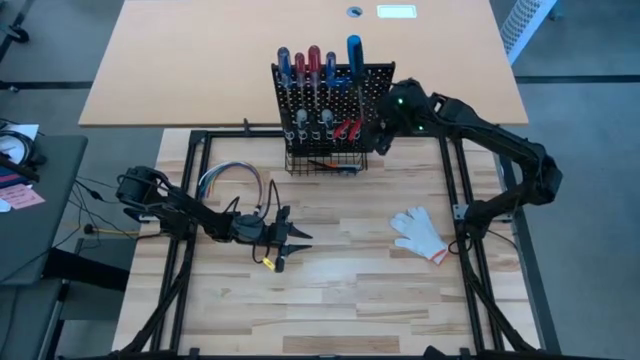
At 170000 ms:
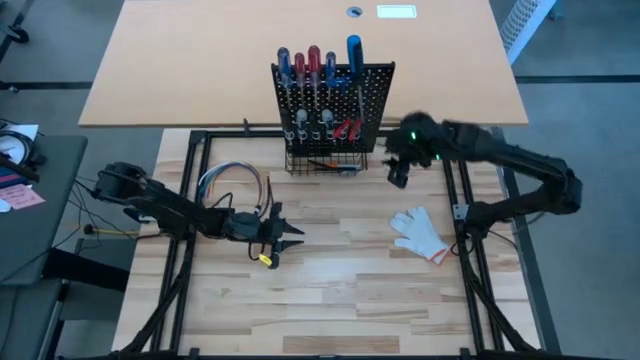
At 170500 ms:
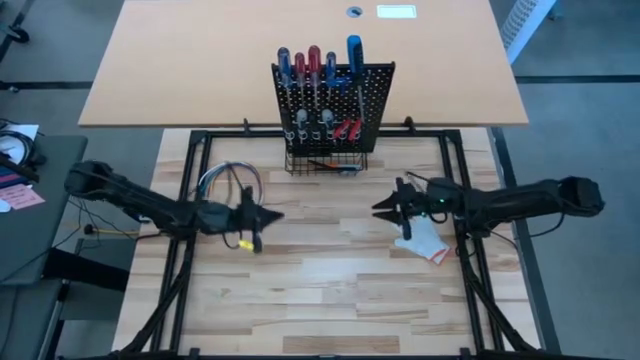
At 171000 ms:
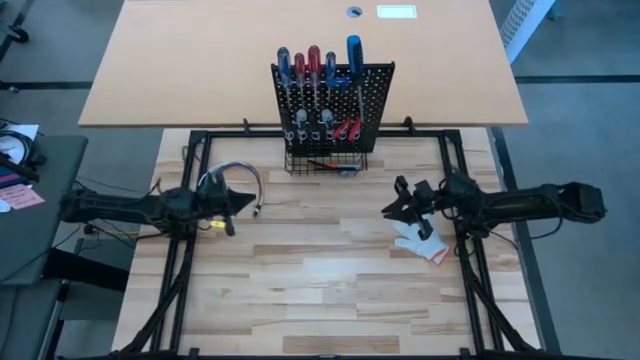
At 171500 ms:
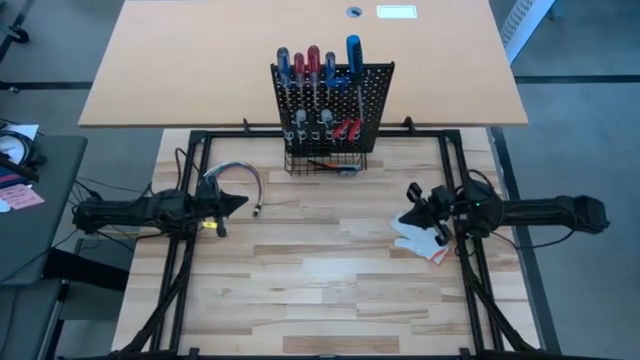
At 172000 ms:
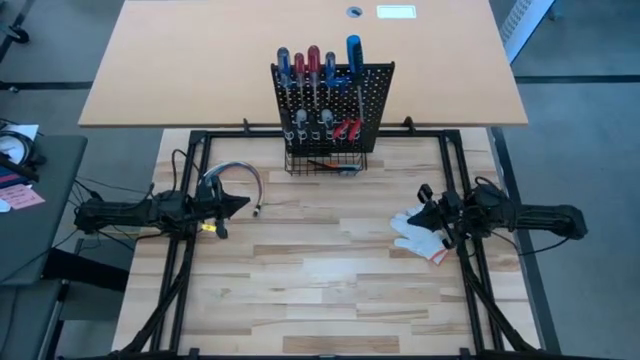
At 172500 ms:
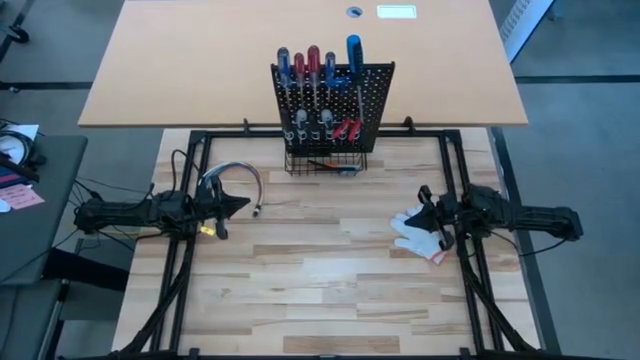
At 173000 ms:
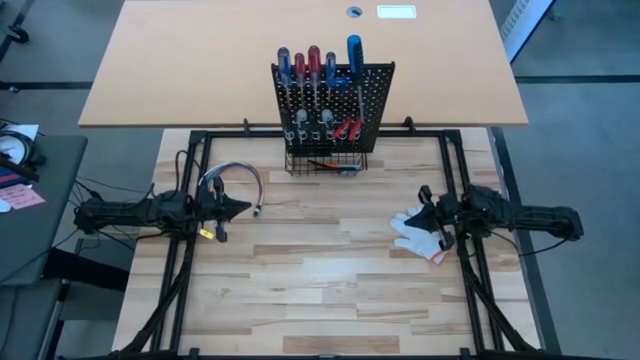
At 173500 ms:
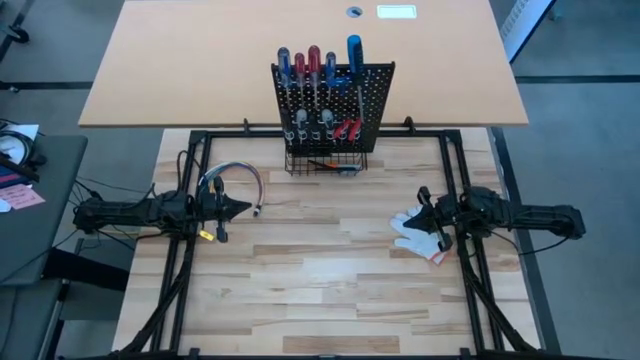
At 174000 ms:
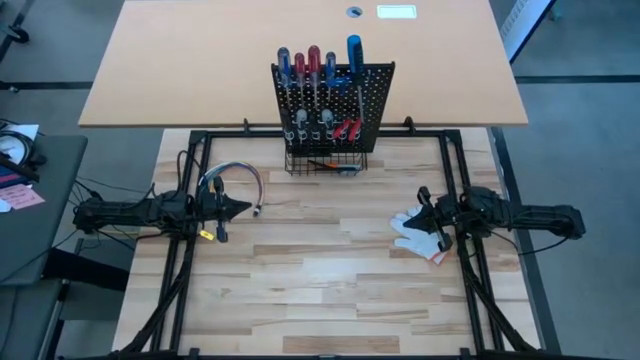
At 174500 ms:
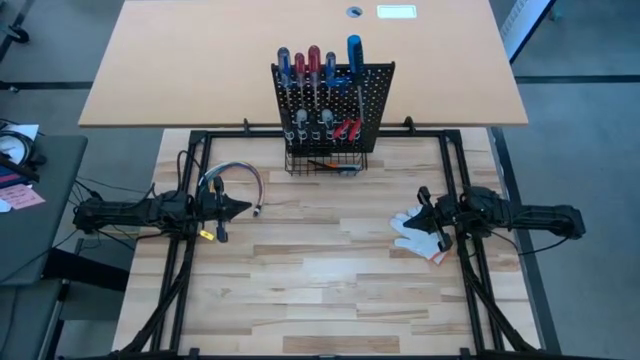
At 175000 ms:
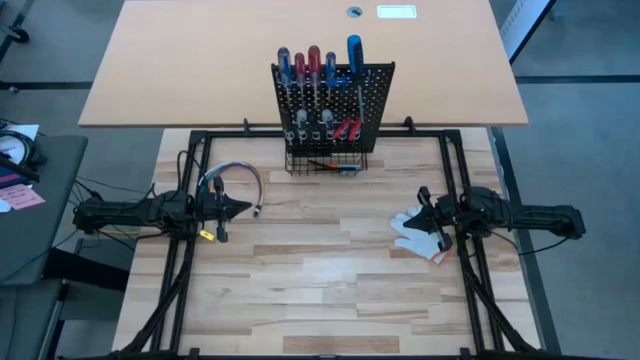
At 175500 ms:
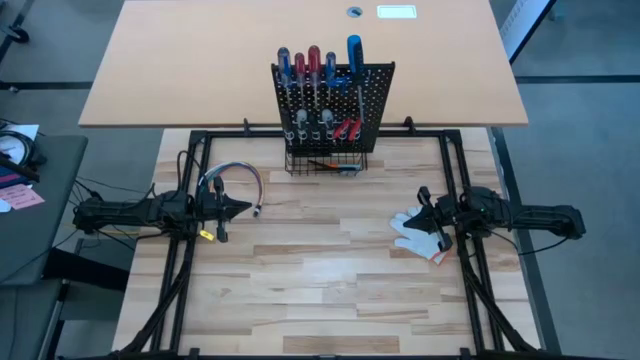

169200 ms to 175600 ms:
Task: Hang tools onto peg board
Return to Home Position

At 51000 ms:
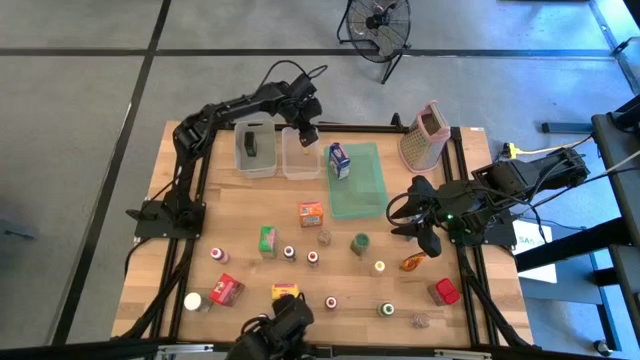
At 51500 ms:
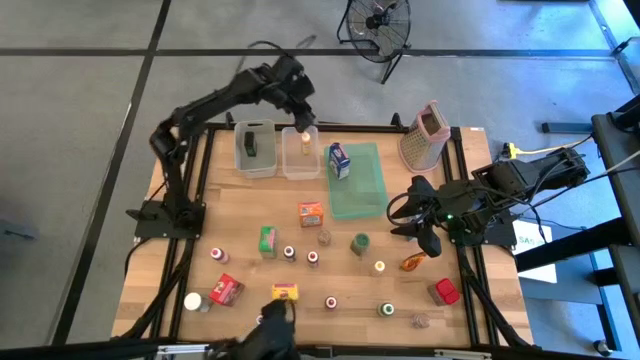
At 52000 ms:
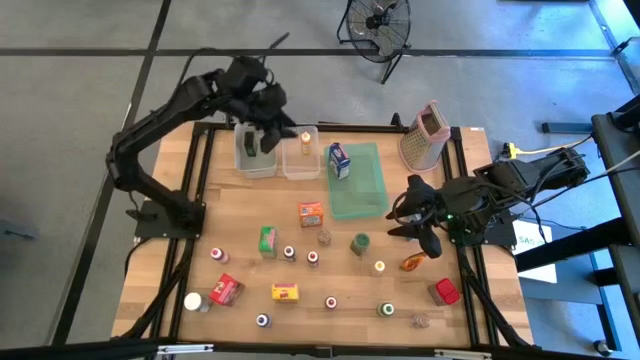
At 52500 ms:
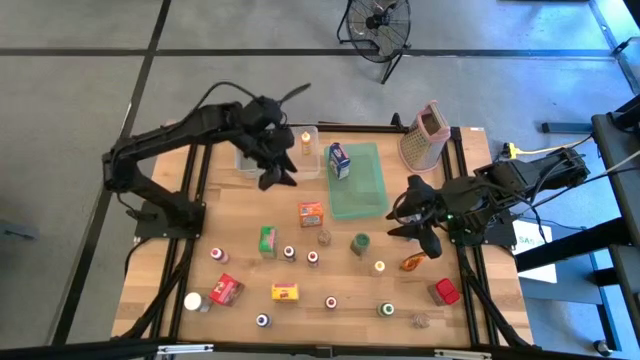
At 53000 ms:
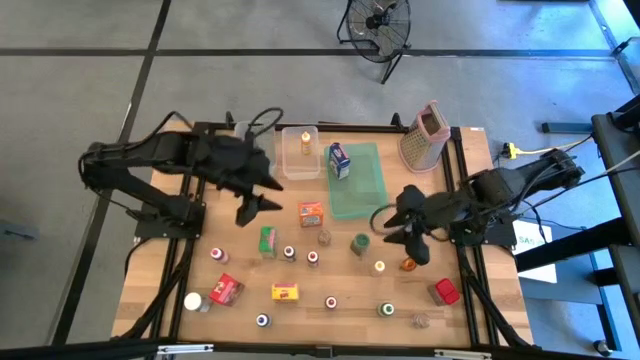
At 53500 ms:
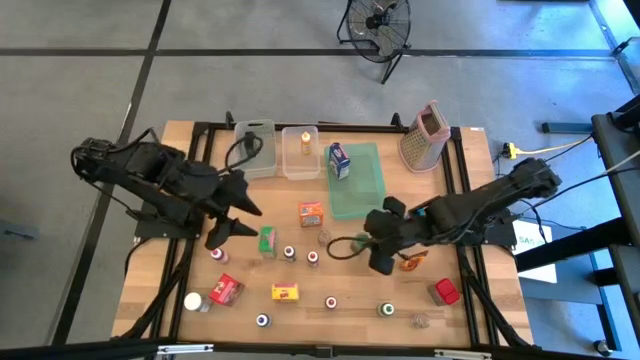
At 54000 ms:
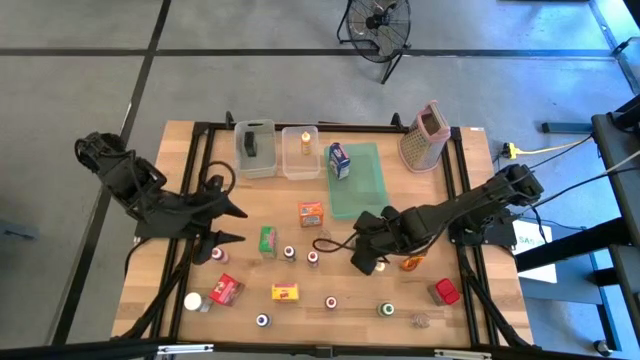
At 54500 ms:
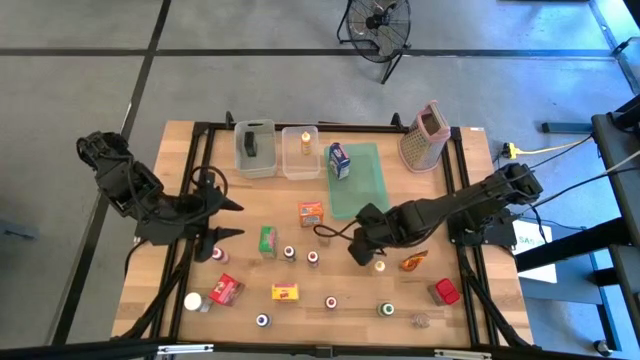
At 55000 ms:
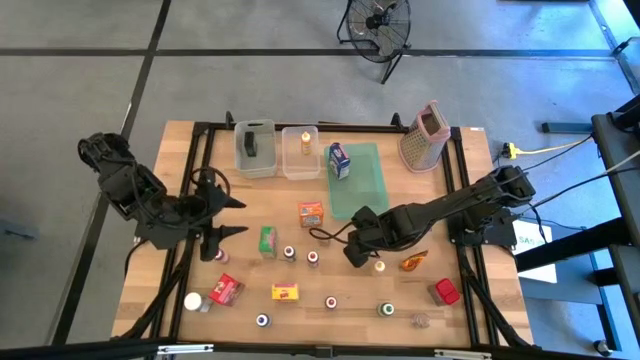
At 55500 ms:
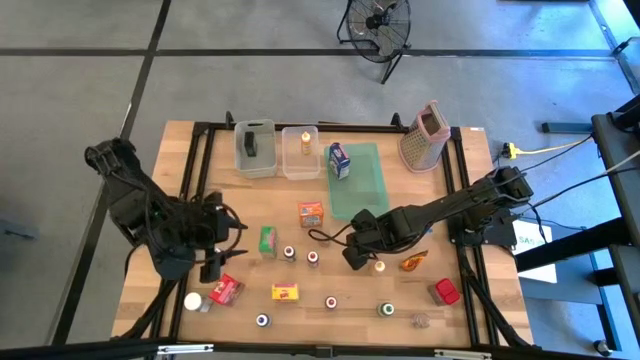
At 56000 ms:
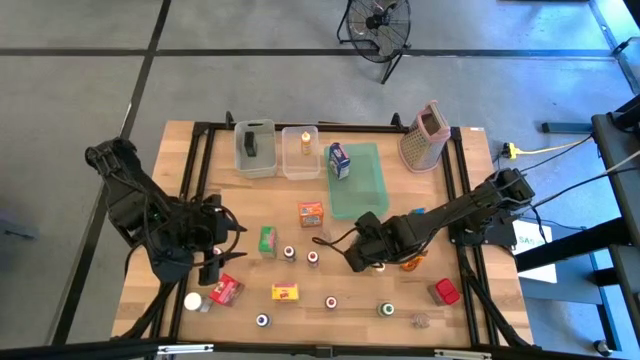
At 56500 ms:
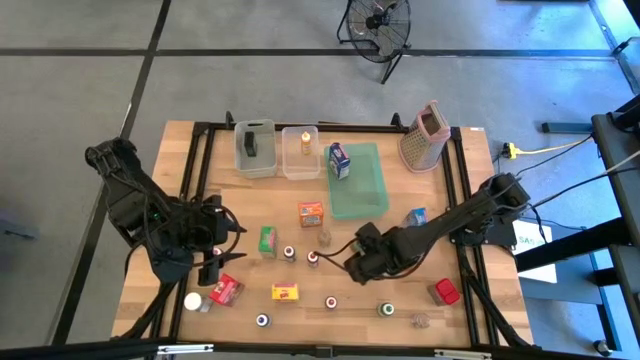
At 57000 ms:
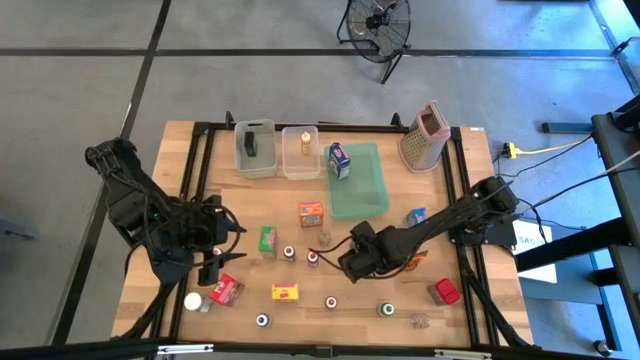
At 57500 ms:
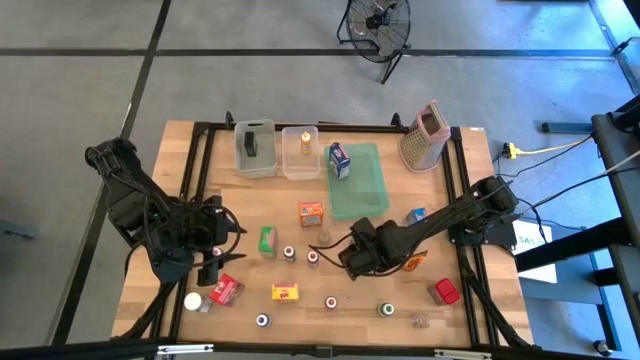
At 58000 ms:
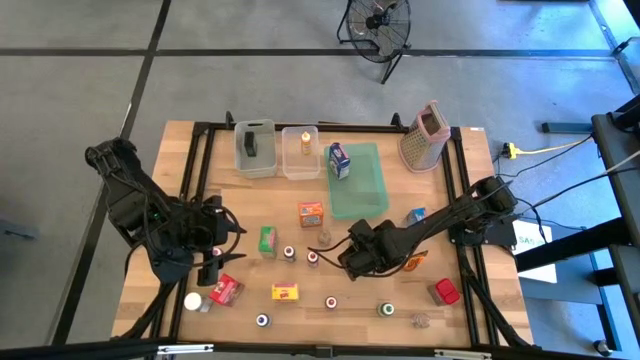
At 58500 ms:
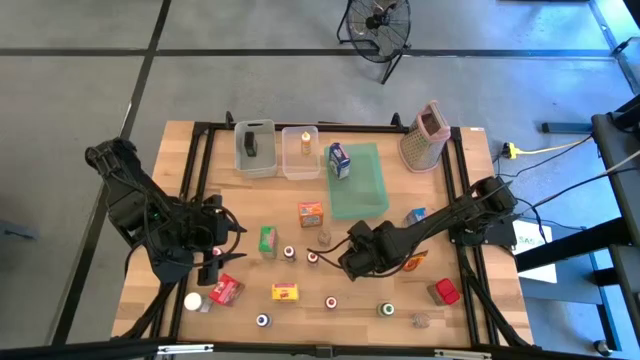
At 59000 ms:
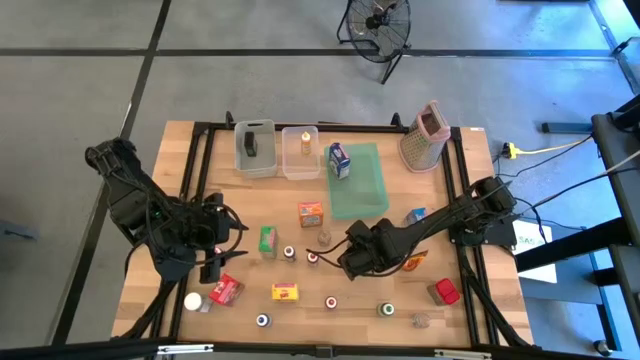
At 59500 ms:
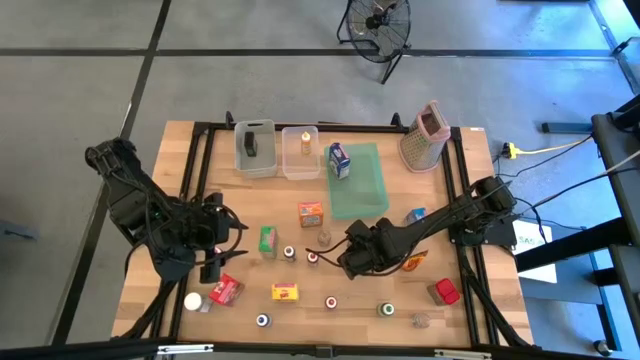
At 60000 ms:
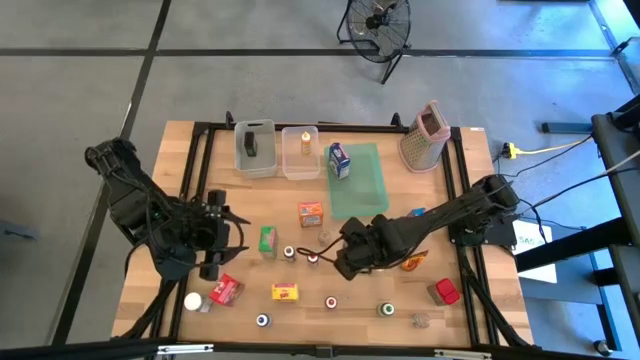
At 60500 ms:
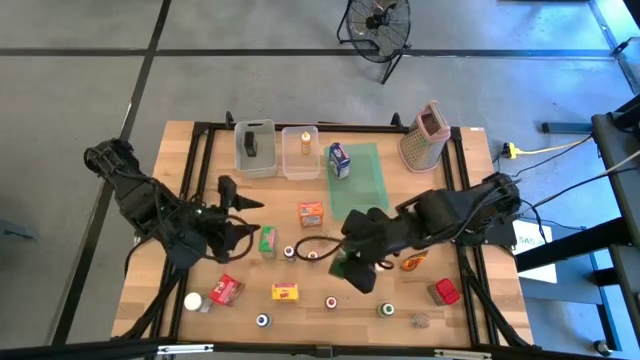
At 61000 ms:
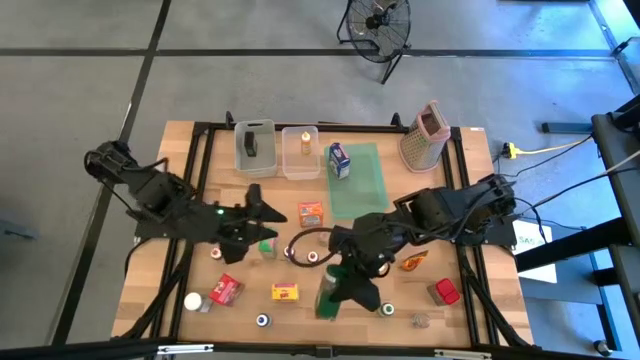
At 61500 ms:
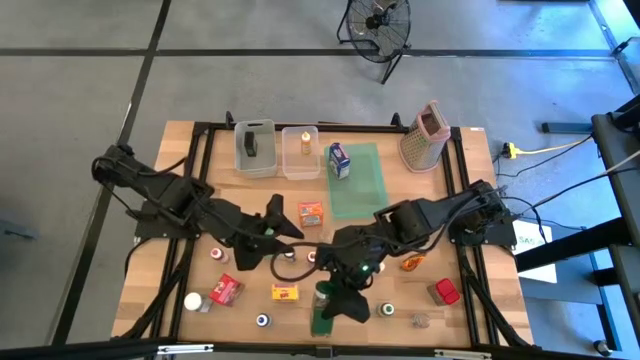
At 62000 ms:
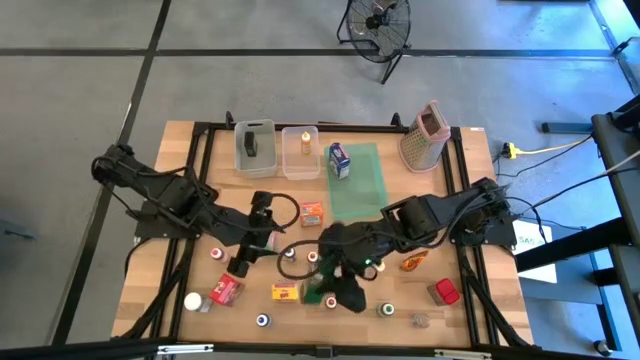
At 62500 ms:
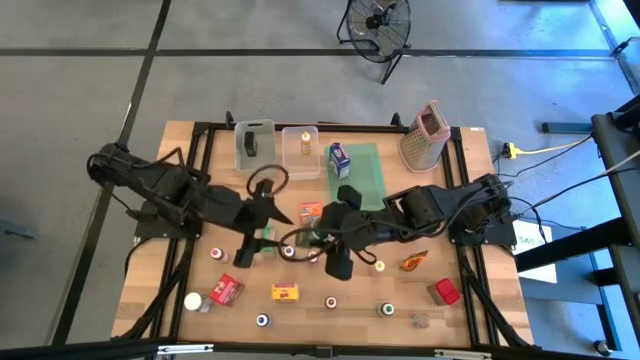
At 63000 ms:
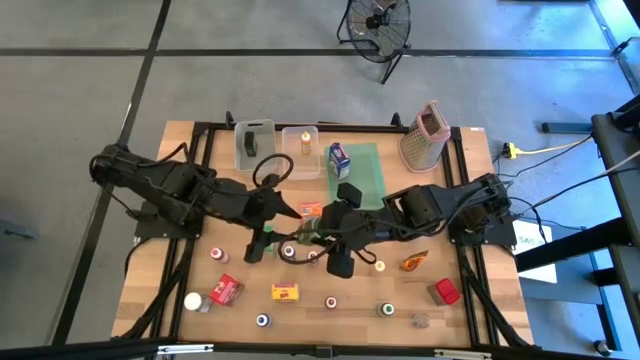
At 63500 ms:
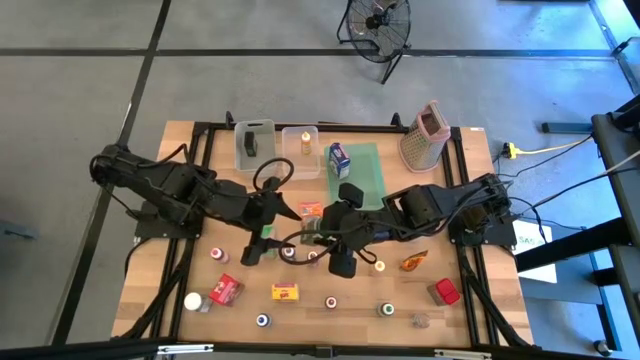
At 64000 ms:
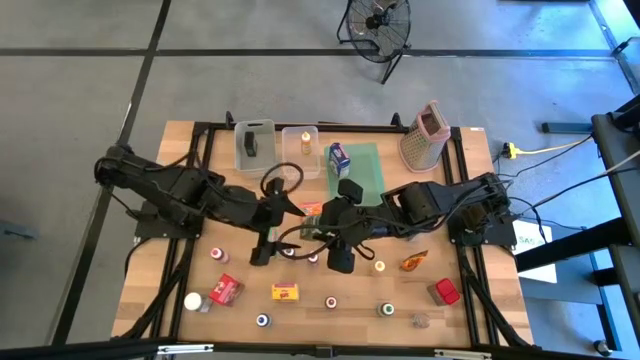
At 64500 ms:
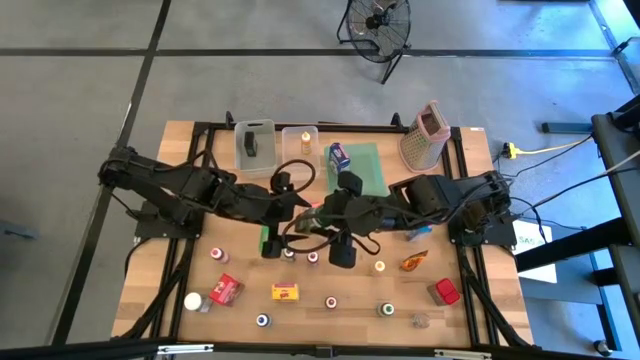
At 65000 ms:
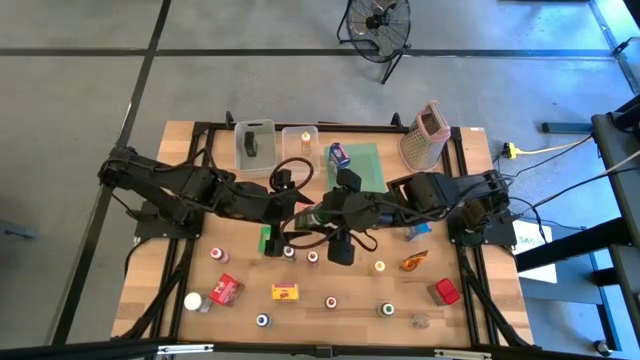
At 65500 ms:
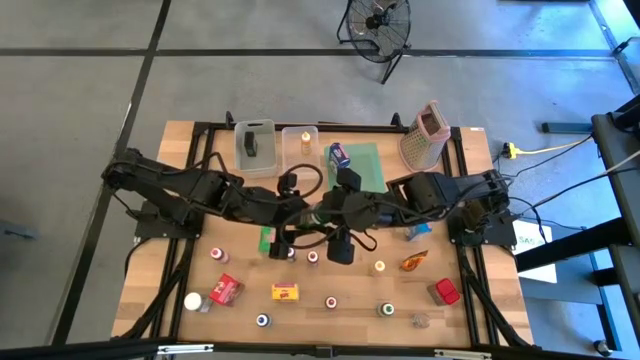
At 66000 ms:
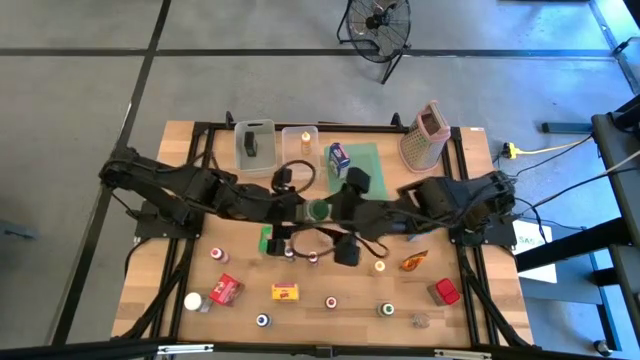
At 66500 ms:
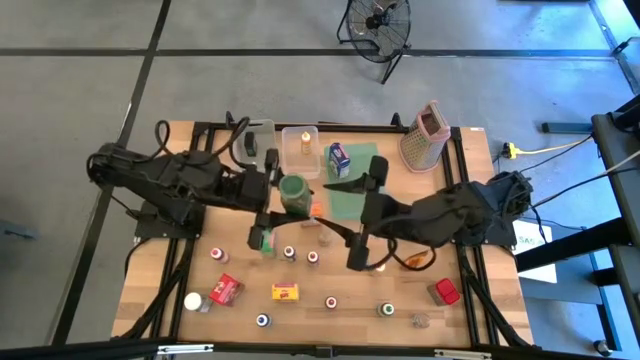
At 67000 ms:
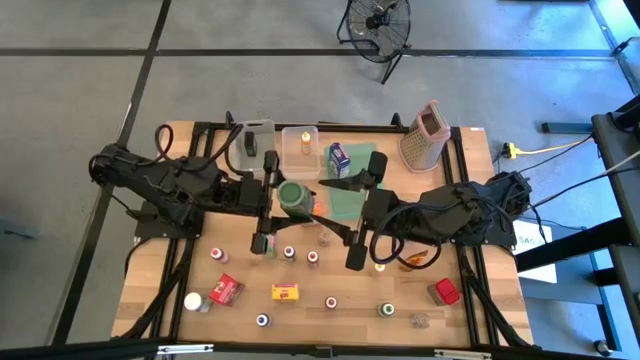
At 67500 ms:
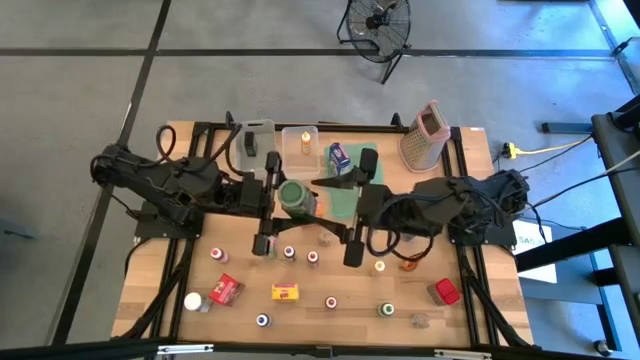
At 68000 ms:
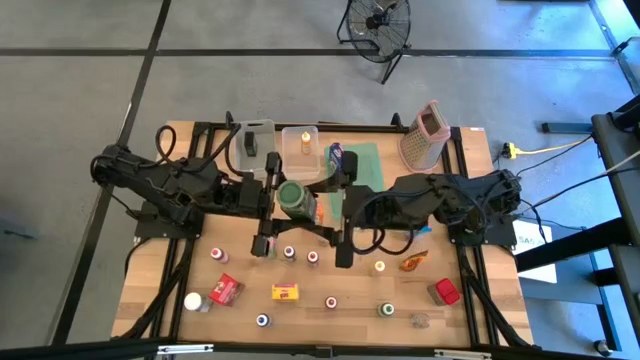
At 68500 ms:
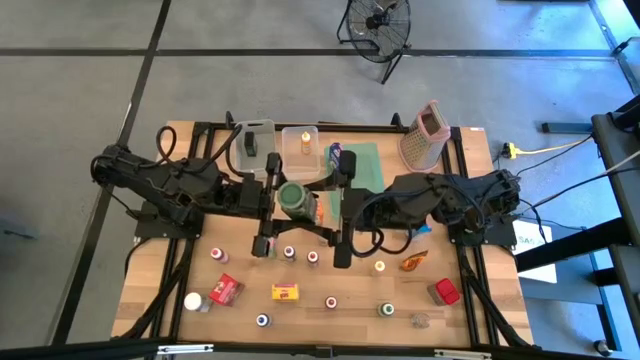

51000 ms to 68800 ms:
Task: Pick & Place Kitchen Items
Put the green spice bottle into the gray bin
